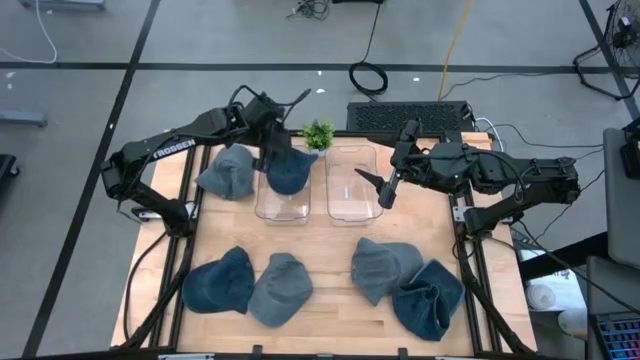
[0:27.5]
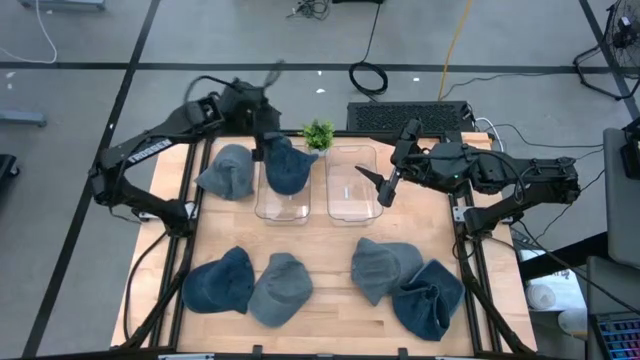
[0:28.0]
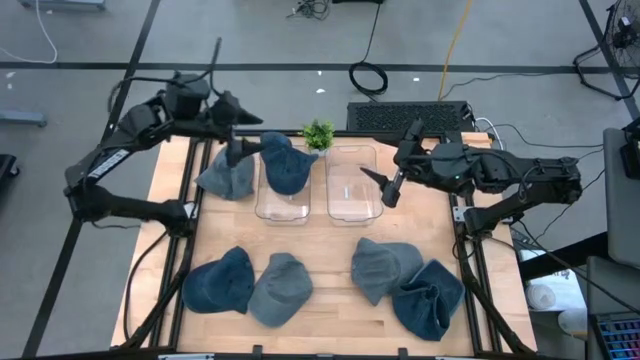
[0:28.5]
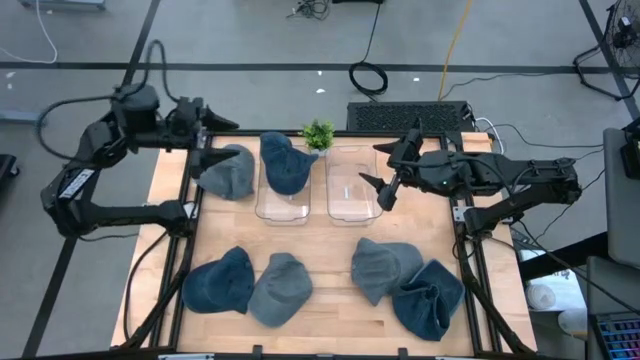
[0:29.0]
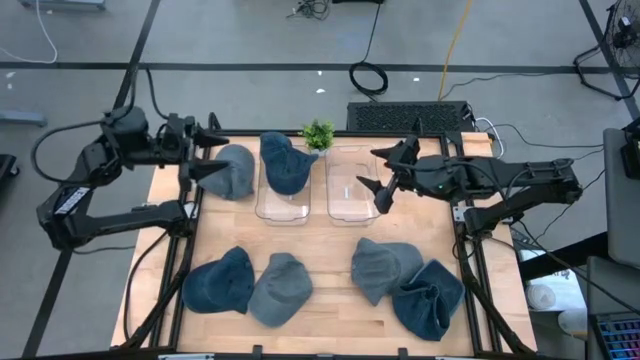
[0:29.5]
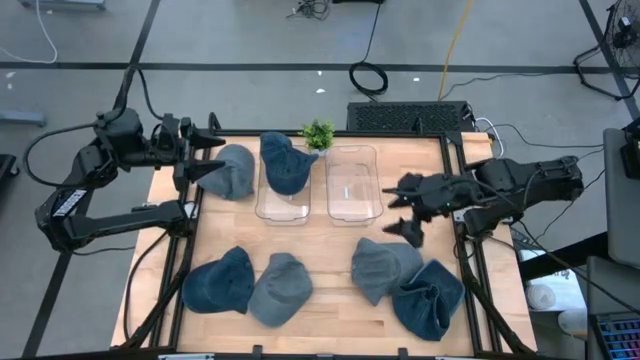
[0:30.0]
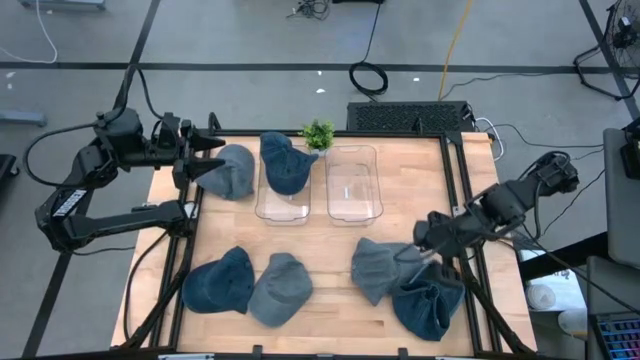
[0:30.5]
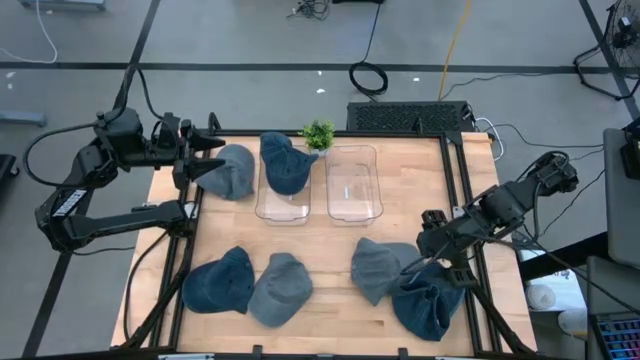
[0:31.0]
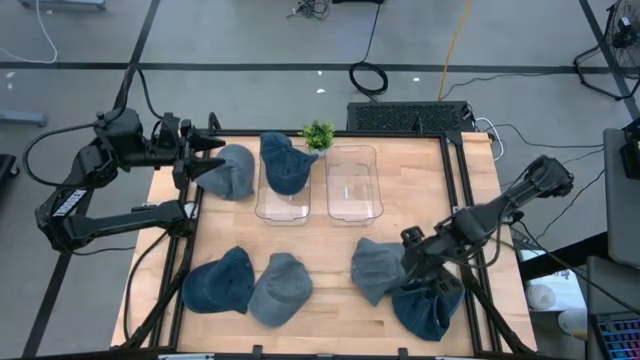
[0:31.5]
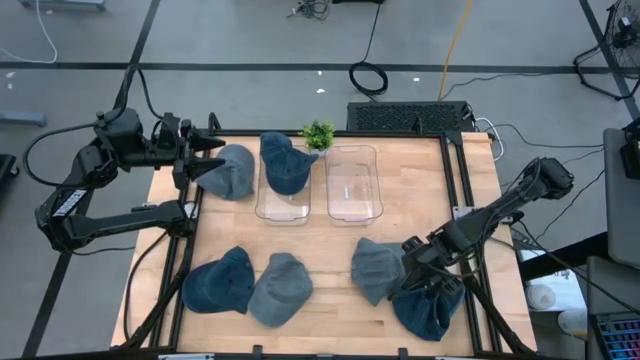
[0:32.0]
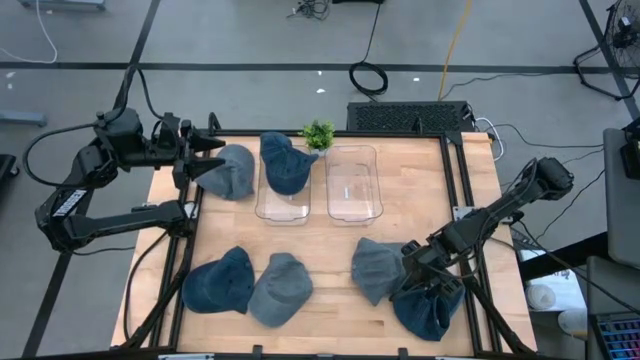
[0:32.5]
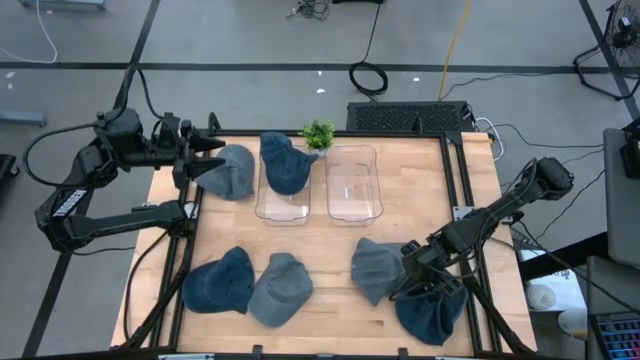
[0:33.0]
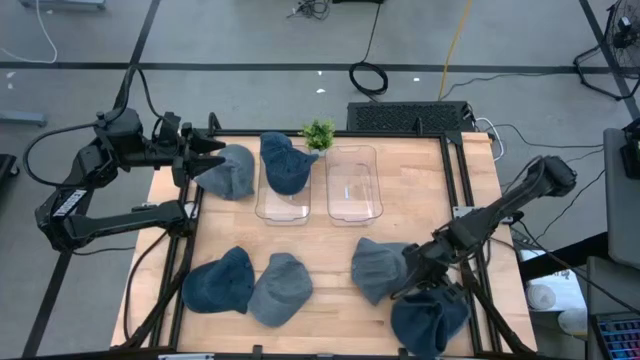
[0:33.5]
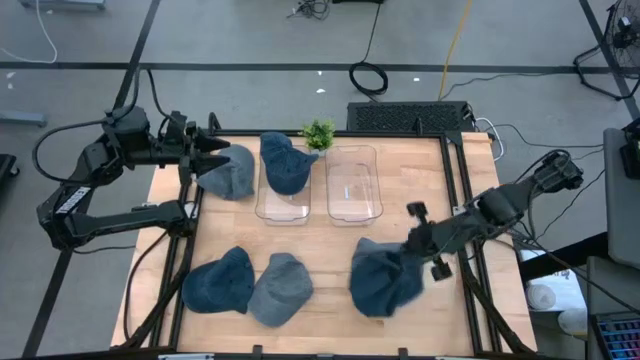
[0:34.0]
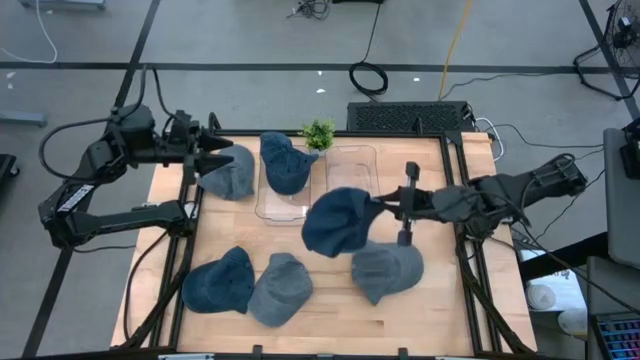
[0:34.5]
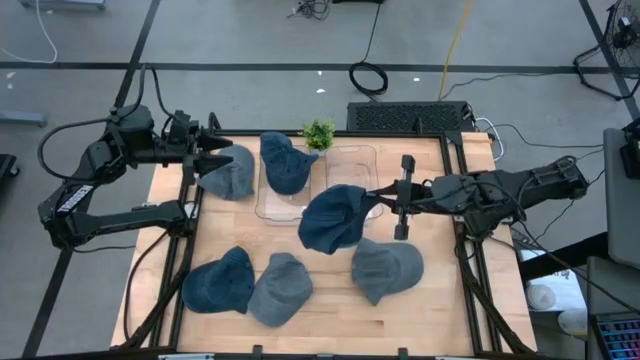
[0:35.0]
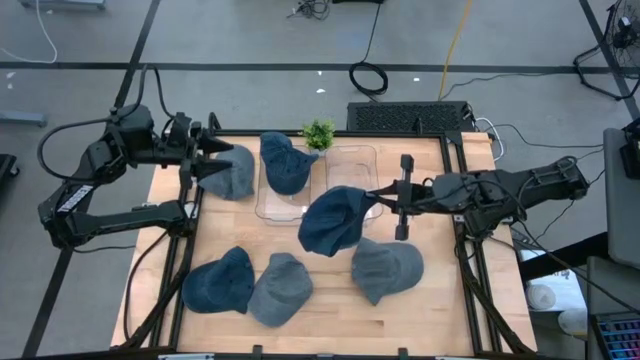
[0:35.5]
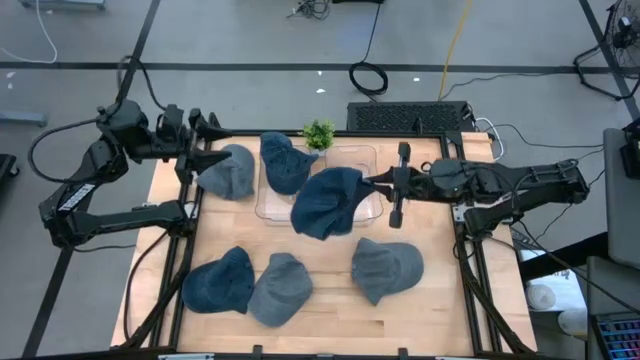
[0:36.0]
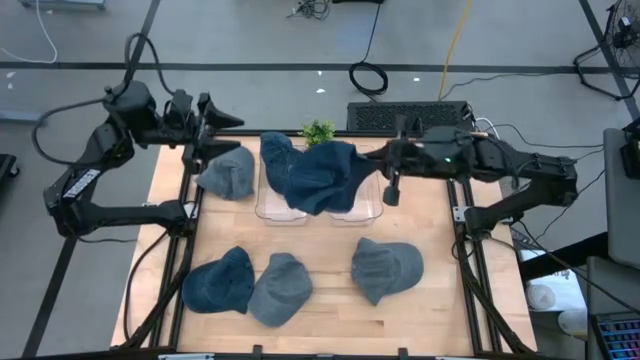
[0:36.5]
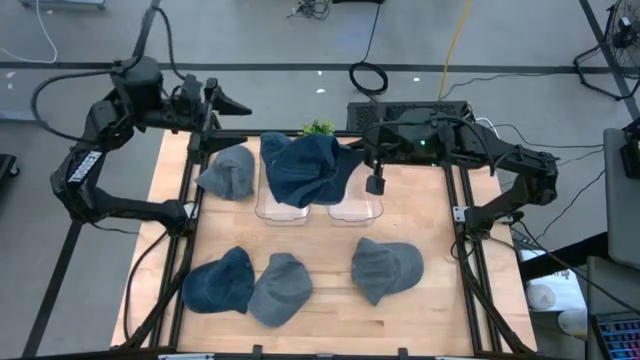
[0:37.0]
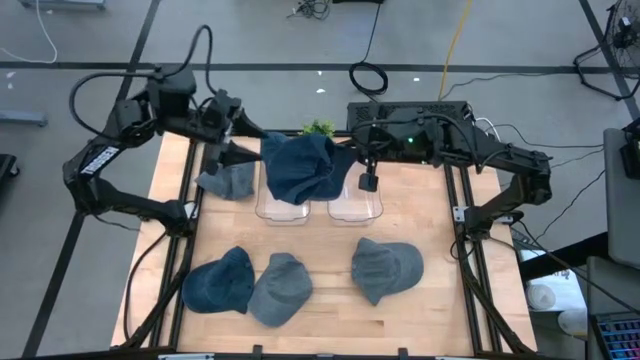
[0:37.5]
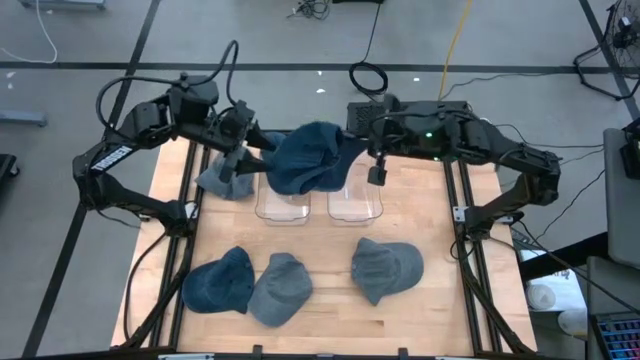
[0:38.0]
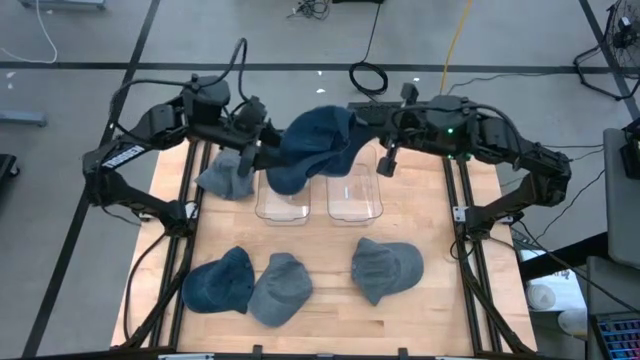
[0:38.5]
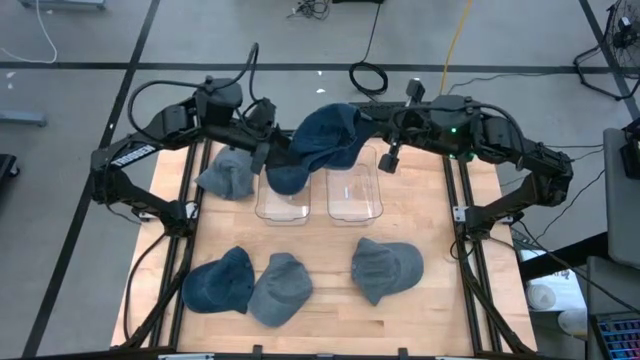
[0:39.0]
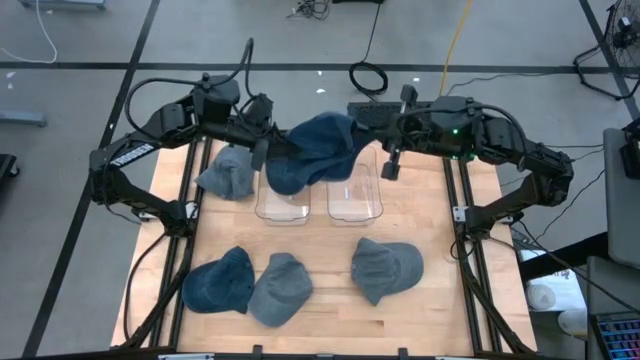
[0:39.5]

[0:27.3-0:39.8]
Task: Pick & Place hat
Put the right blue cap into the left transparent bin

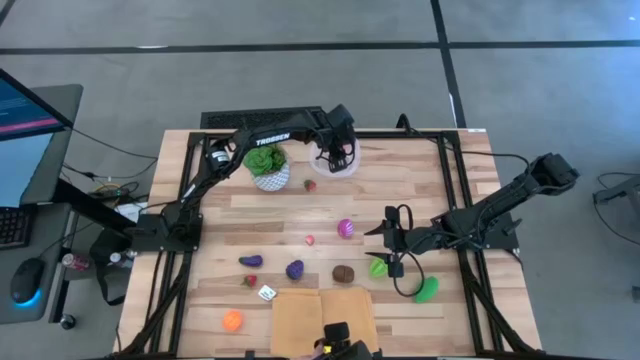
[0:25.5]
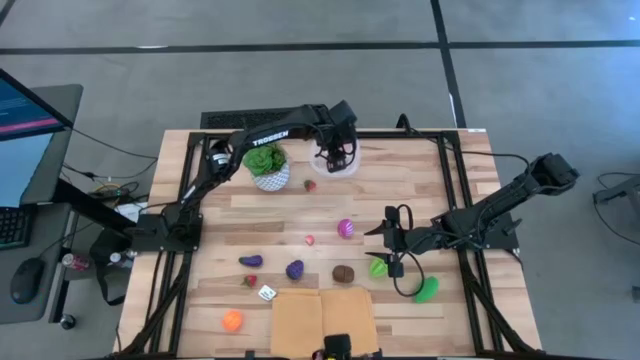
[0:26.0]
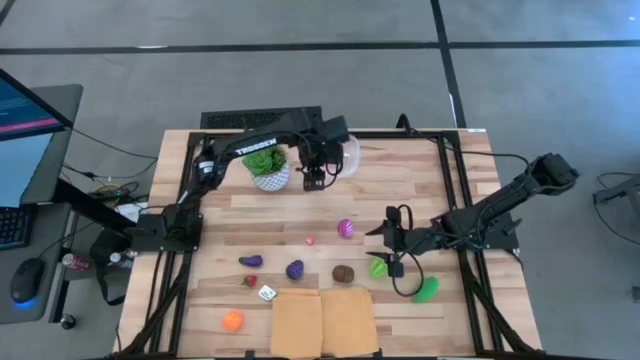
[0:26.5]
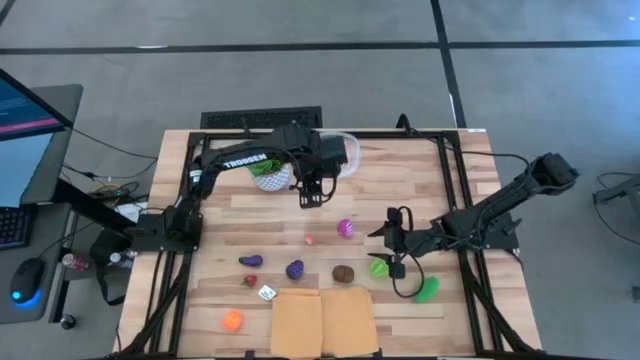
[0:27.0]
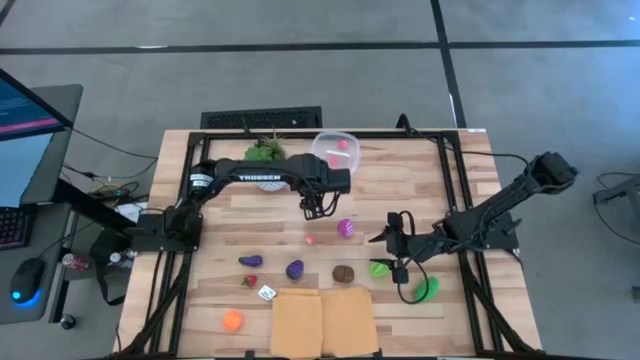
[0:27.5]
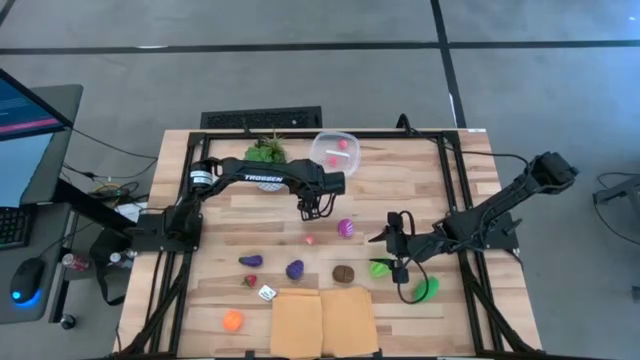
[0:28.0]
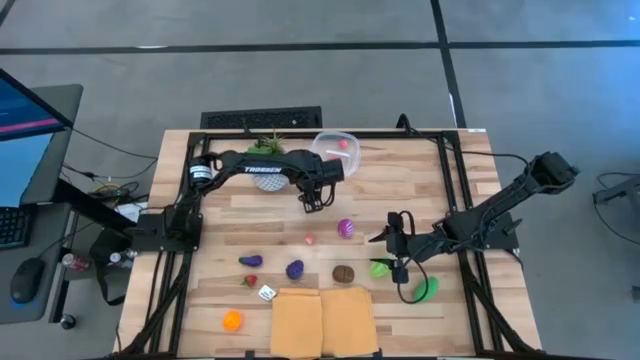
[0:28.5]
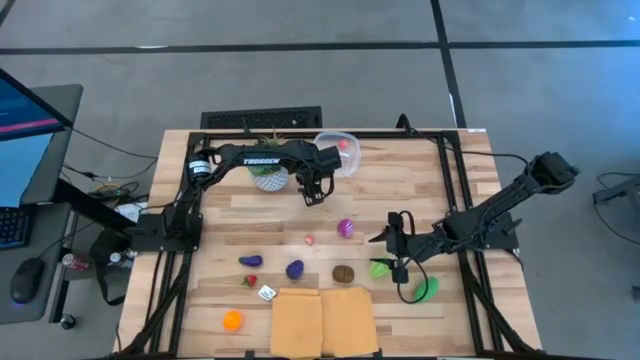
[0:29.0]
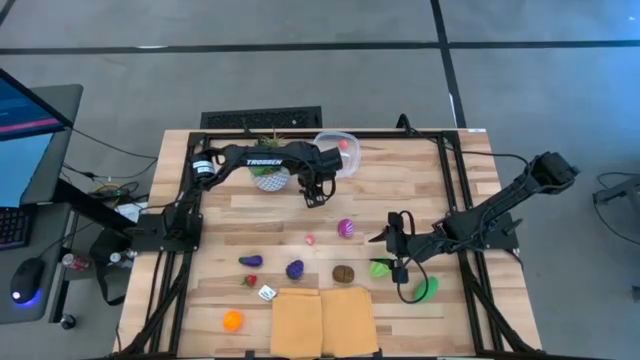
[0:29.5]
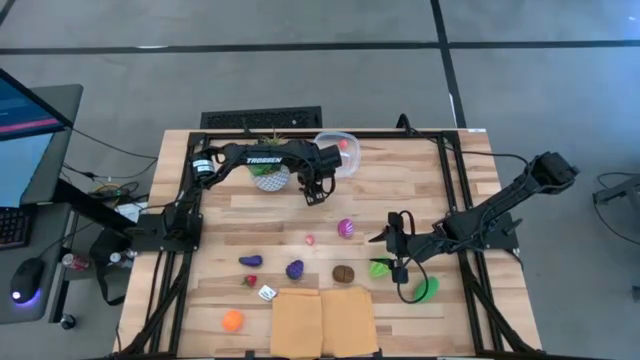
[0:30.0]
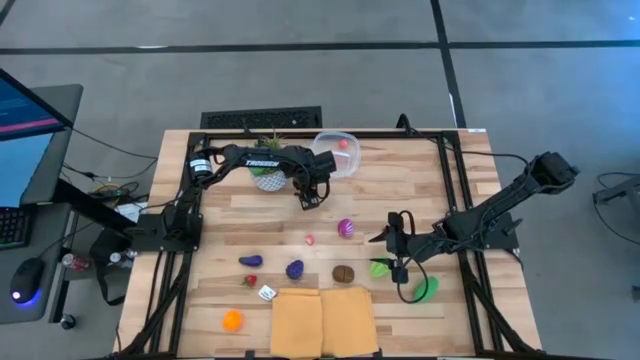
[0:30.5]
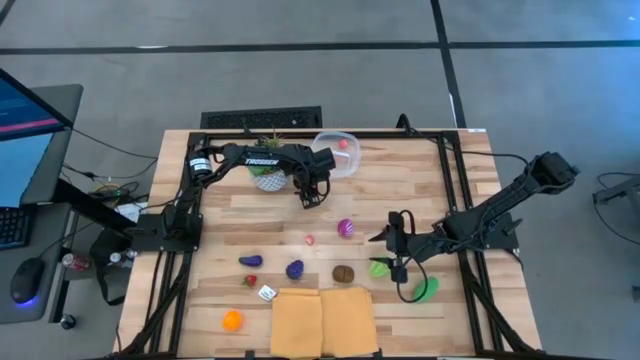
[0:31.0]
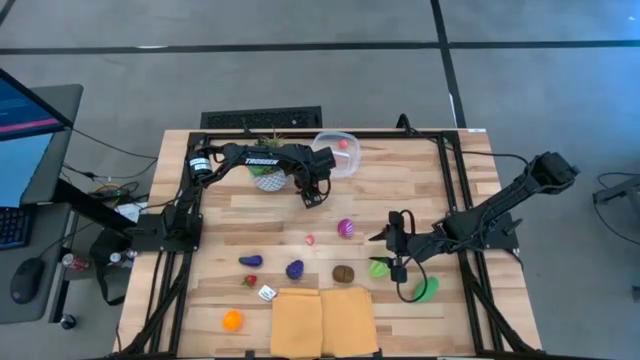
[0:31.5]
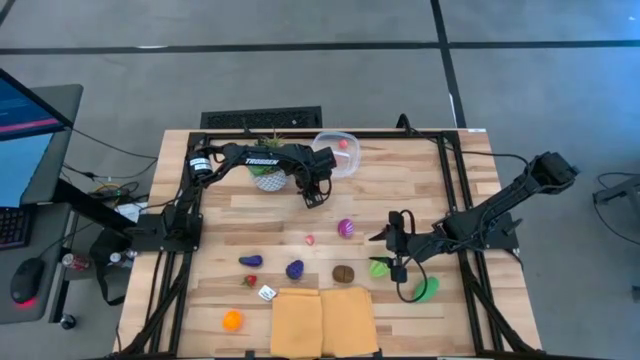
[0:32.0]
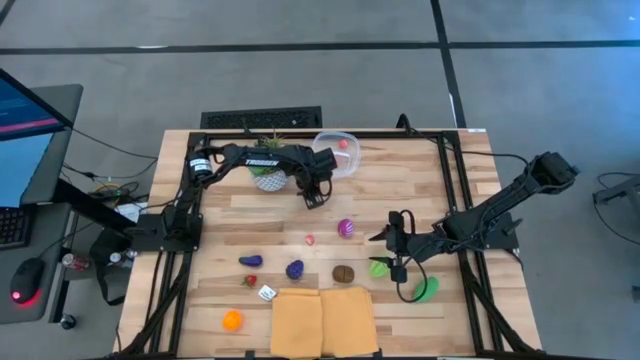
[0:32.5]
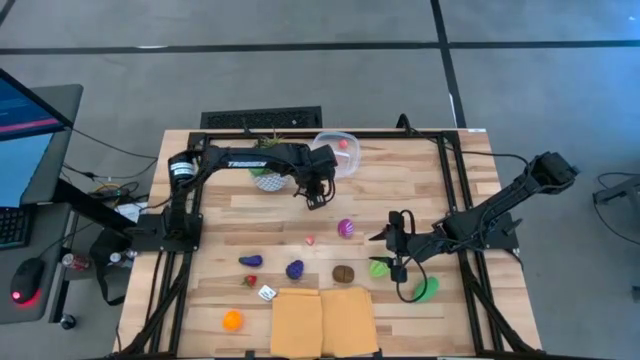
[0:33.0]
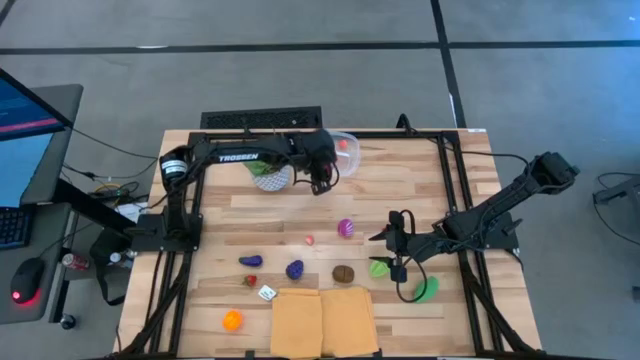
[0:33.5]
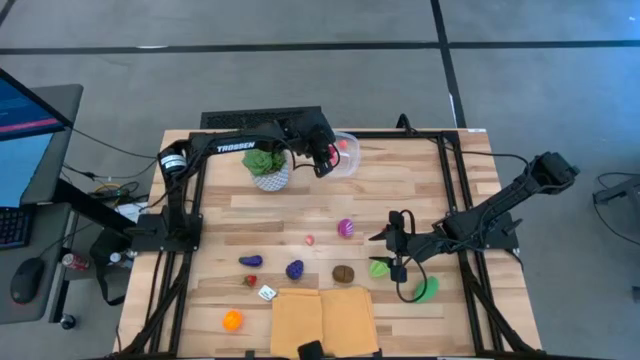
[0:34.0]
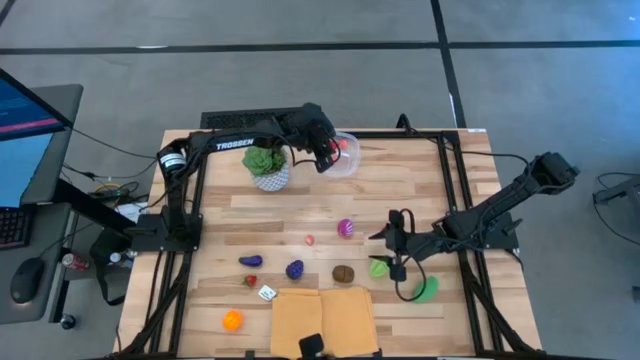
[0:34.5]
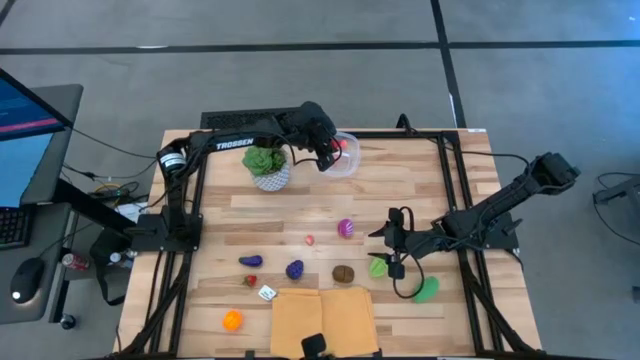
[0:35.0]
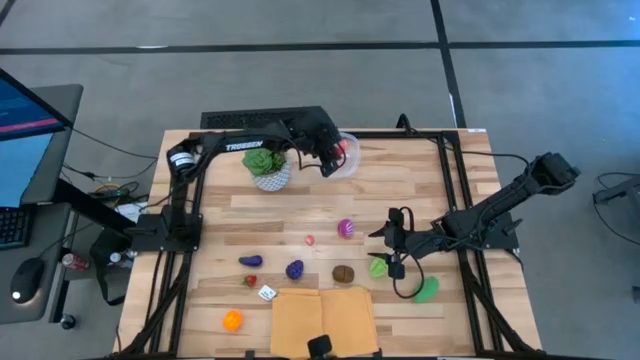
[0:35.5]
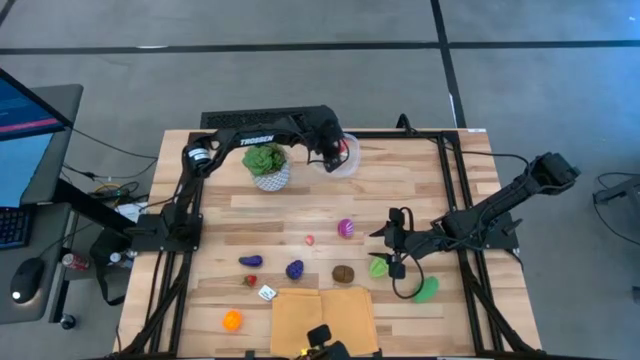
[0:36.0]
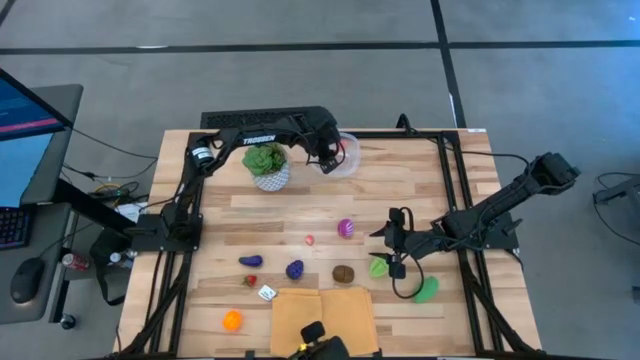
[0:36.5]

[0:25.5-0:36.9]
Task: Pick and placing Produce into tupperware
Put the top left strawberry into the transparent bin
